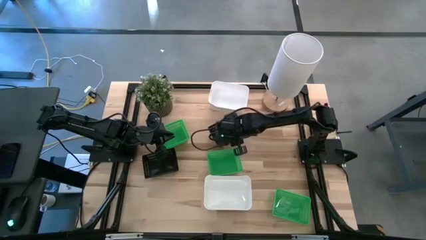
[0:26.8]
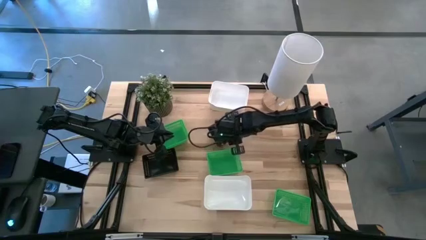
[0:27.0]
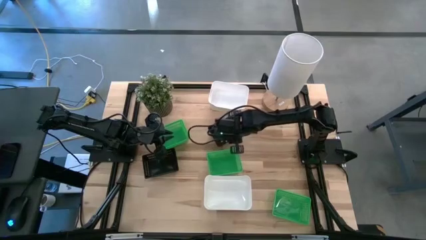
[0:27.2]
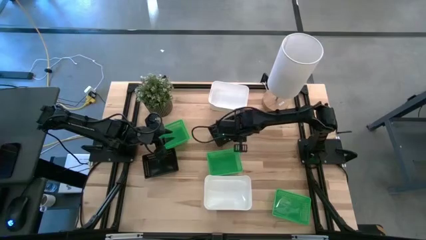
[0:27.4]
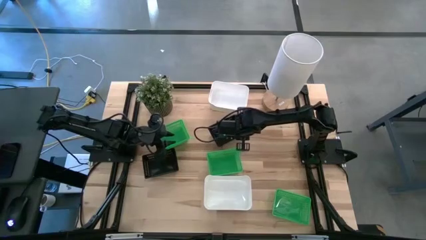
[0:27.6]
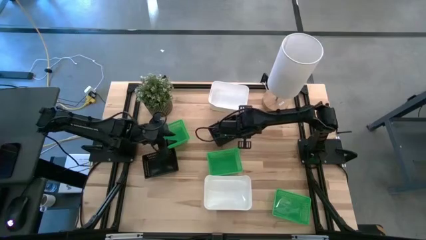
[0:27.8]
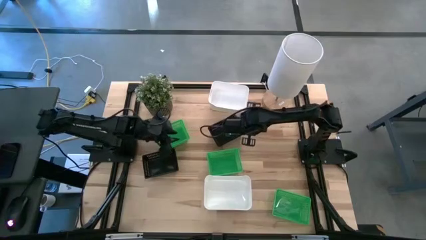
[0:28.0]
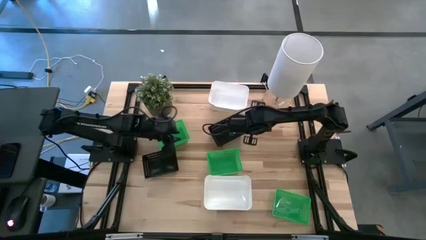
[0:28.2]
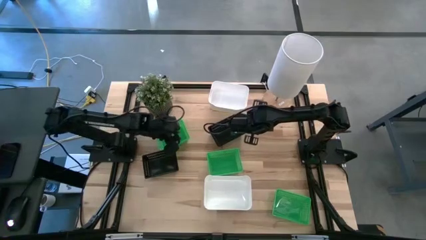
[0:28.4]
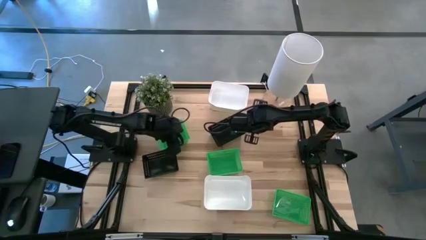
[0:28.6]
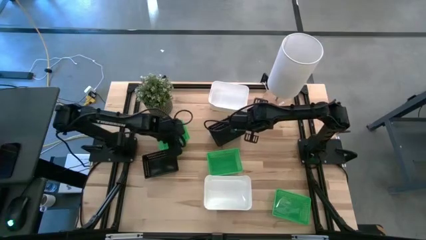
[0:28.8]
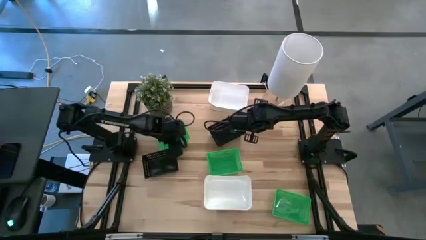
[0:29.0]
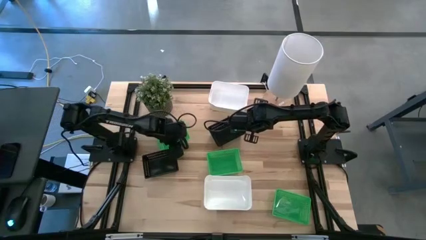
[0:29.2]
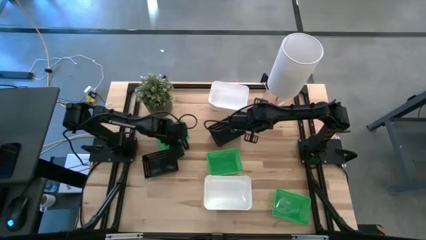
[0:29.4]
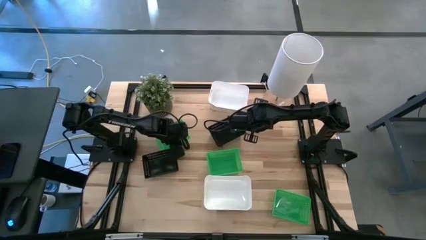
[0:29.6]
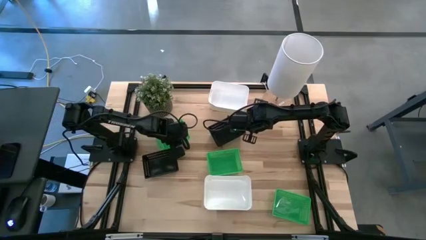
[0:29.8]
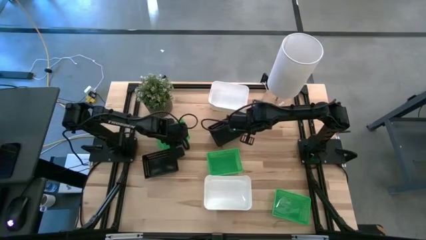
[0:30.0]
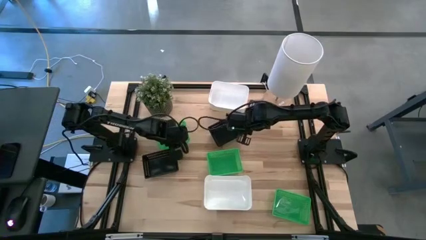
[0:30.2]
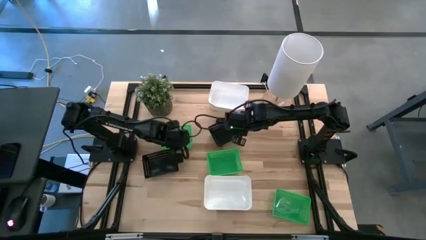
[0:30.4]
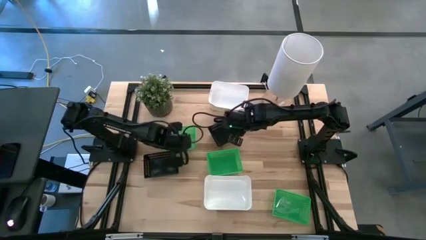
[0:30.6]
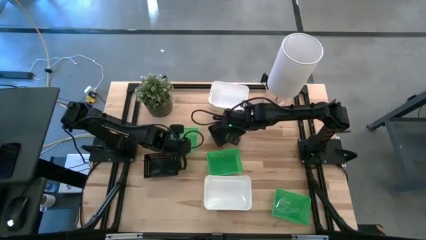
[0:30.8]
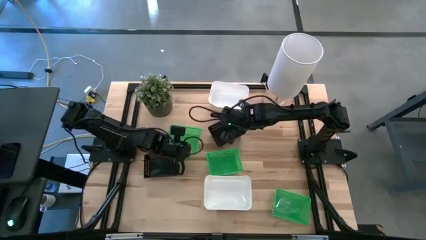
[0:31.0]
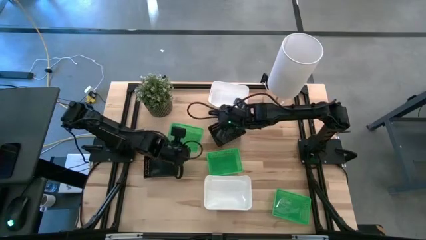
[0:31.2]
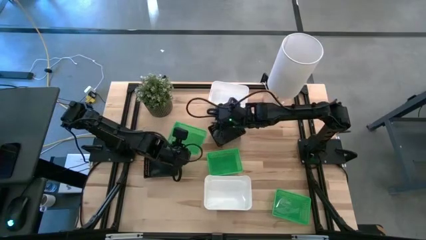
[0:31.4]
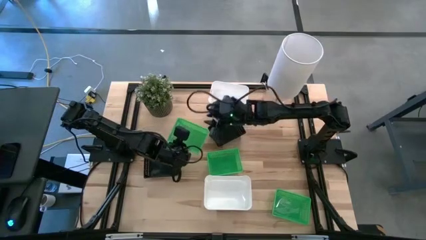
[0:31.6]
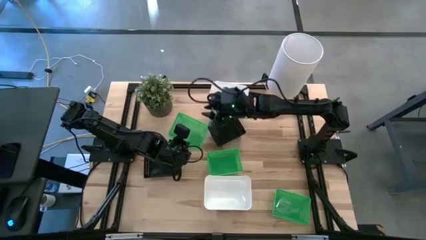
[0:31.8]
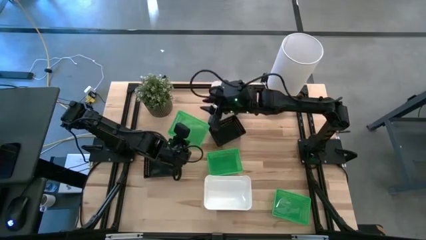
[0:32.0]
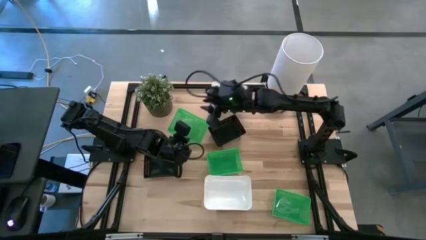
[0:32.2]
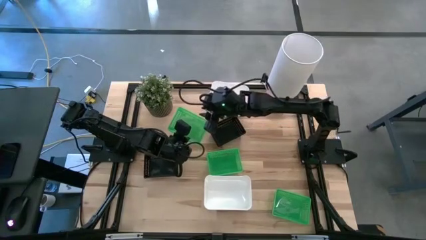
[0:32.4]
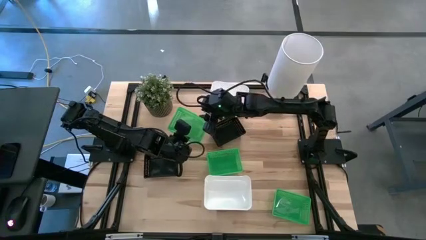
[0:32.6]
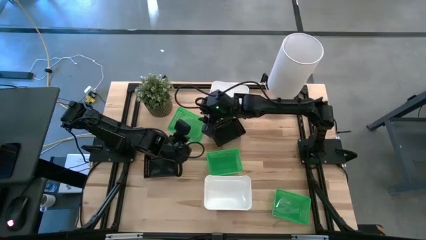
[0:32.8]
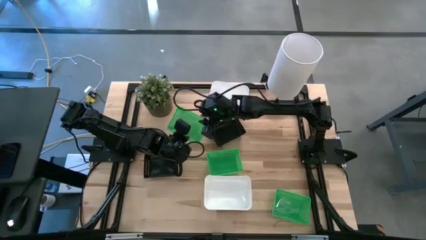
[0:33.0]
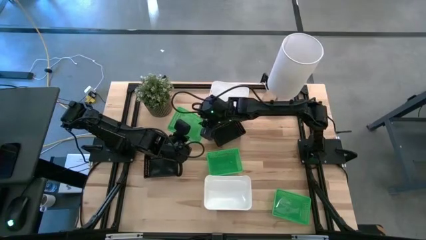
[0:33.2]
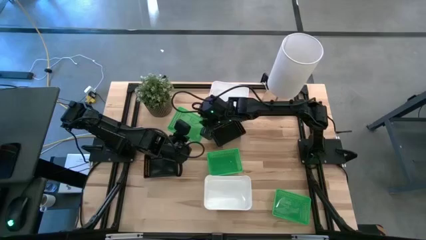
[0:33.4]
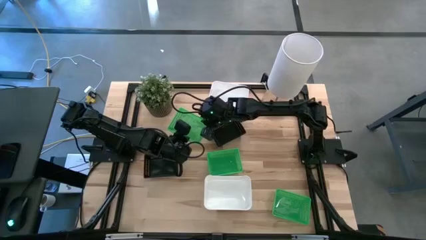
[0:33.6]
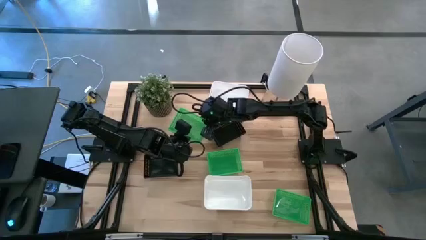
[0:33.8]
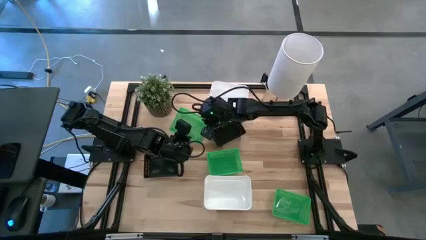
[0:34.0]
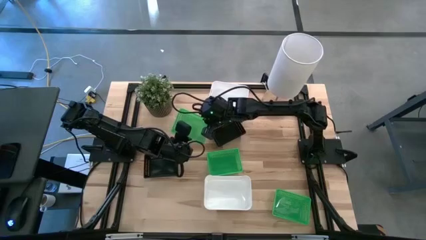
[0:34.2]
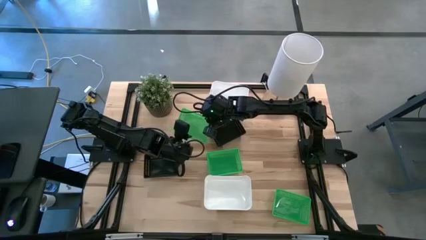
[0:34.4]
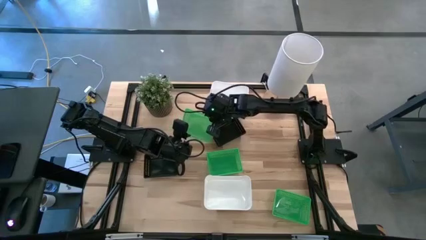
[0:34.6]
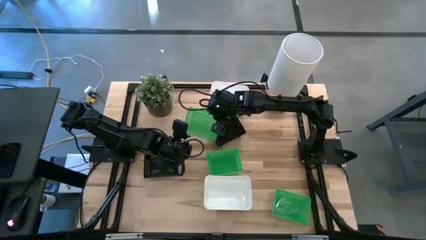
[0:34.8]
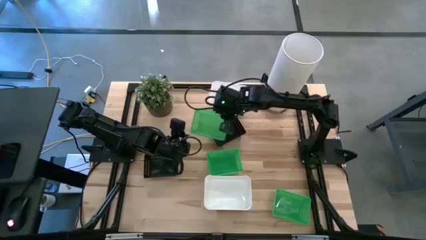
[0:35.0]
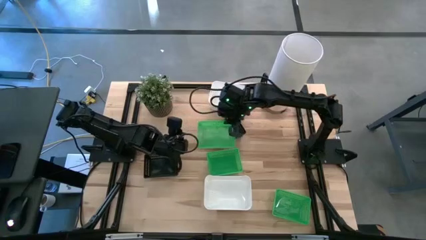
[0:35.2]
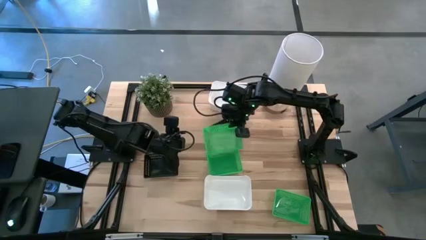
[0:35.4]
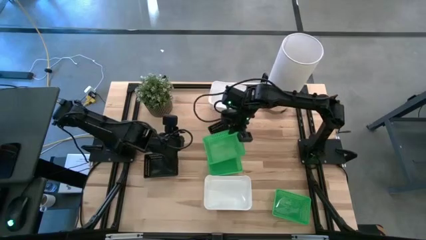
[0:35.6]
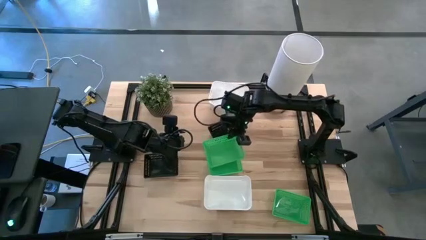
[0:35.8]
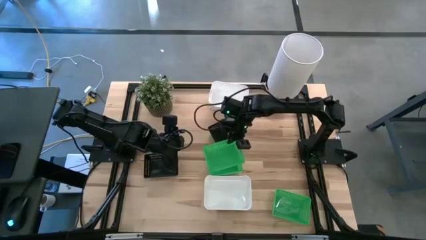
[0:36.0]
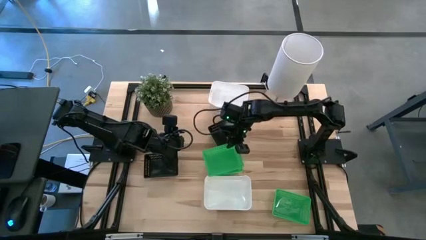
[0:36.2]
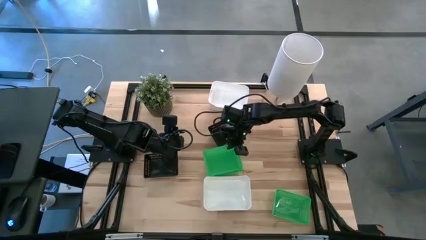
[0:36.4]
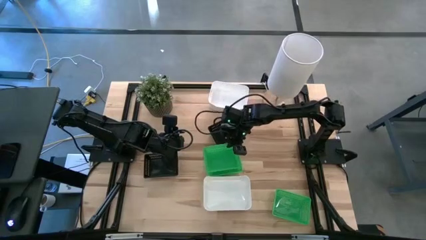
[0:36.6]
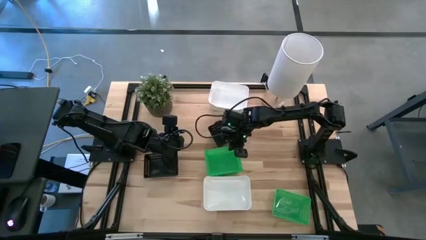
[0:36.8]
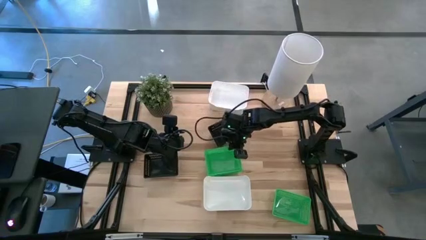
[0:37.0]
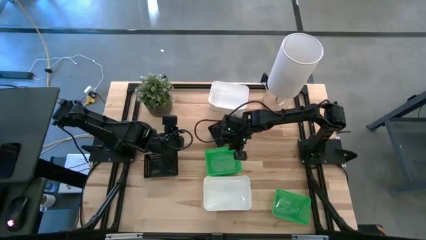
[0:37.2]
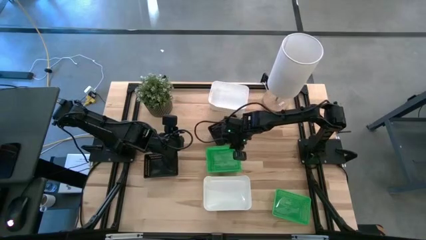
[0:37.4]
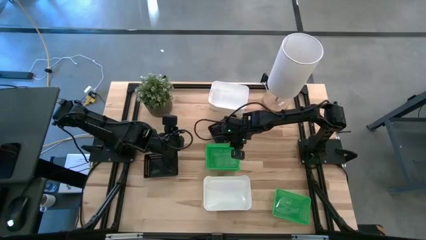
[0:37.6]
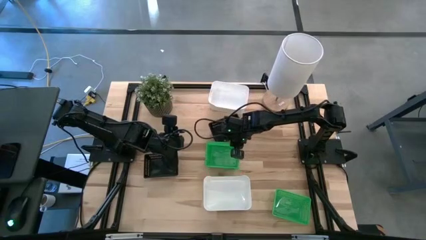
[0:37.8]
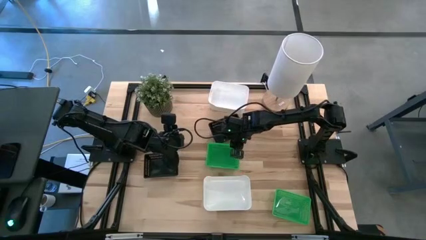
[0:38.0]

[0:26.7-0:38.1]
Stack the top green bin on the middle green bin

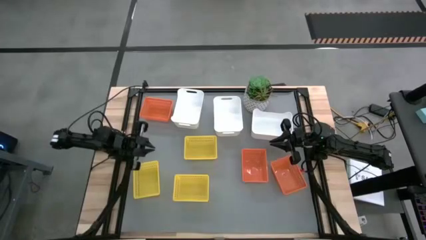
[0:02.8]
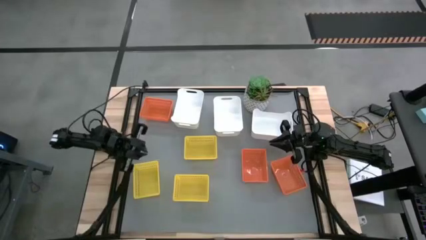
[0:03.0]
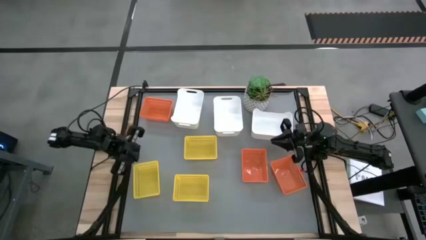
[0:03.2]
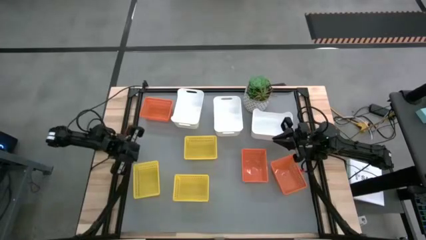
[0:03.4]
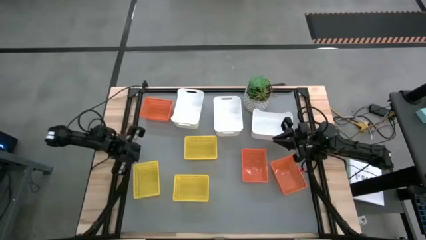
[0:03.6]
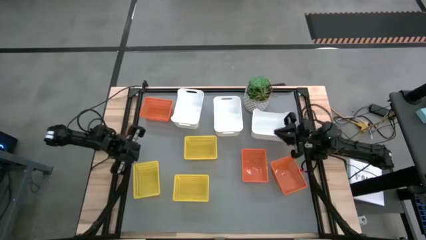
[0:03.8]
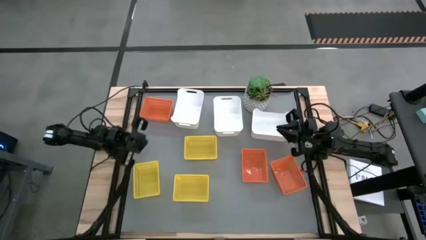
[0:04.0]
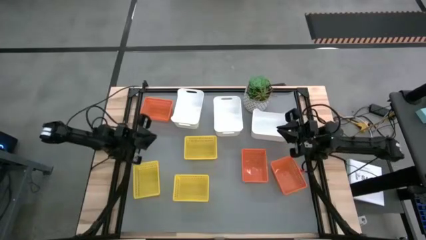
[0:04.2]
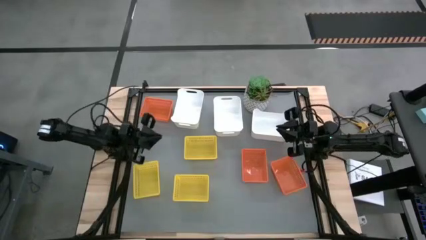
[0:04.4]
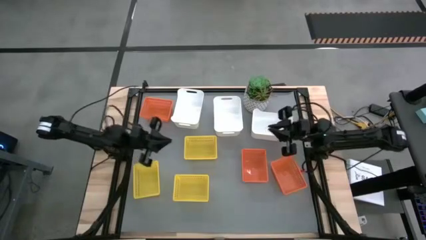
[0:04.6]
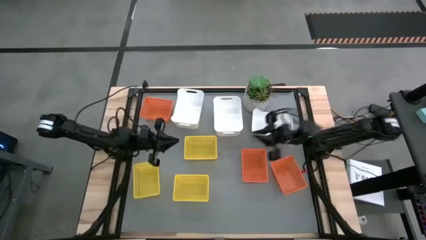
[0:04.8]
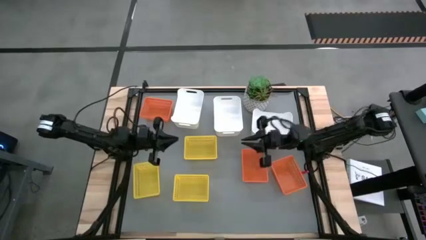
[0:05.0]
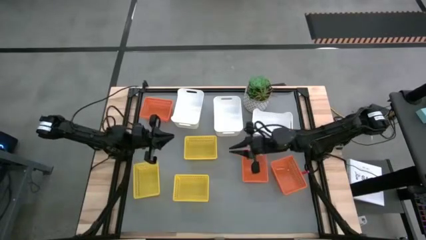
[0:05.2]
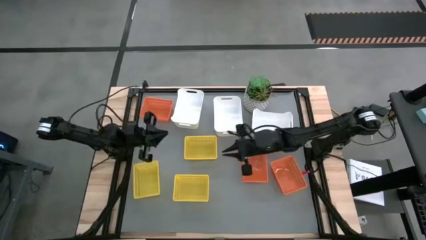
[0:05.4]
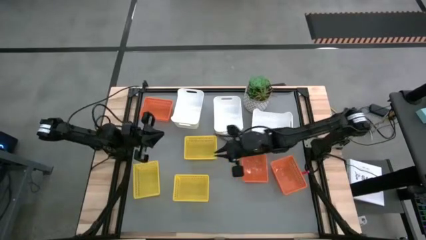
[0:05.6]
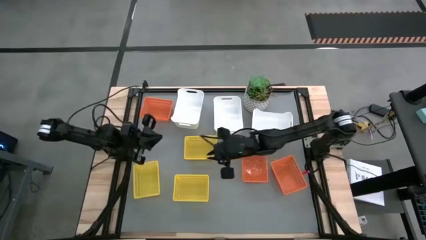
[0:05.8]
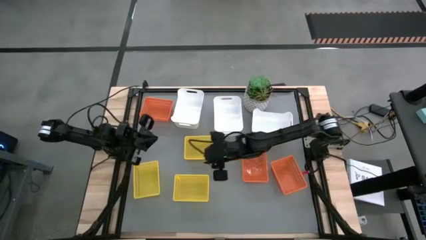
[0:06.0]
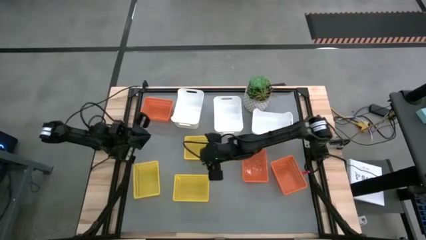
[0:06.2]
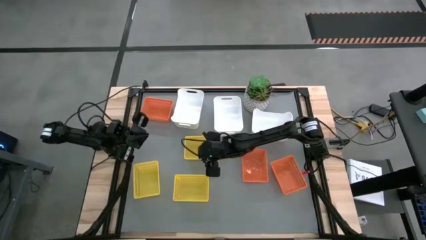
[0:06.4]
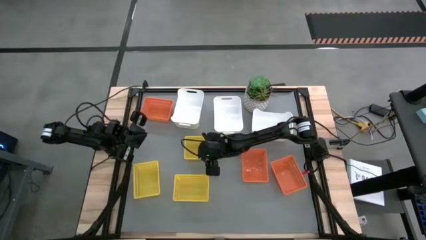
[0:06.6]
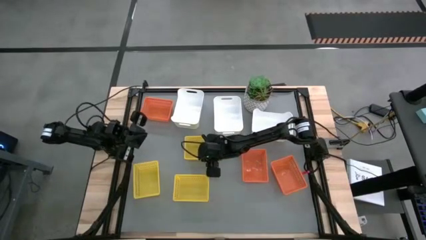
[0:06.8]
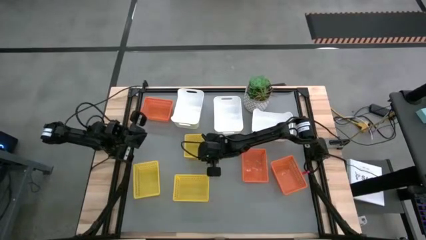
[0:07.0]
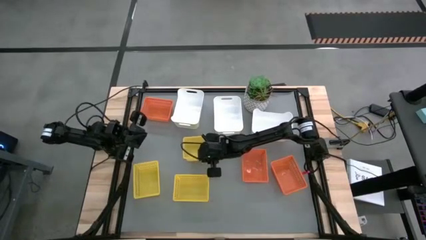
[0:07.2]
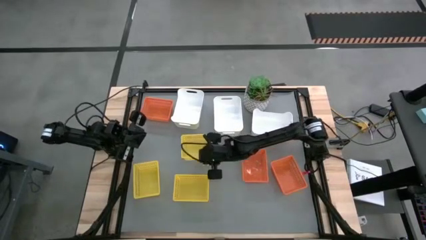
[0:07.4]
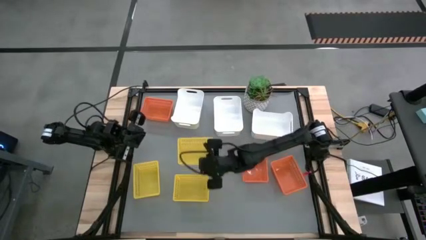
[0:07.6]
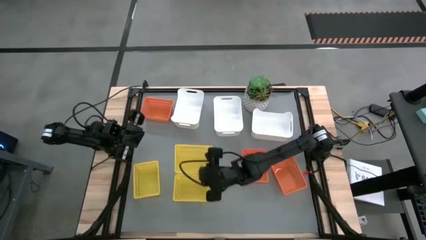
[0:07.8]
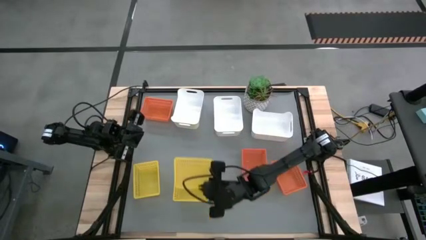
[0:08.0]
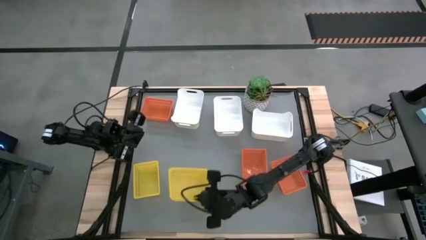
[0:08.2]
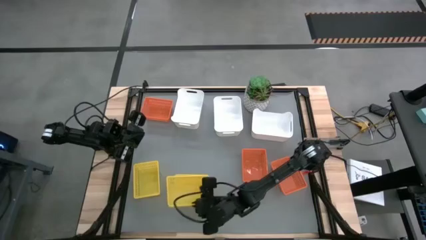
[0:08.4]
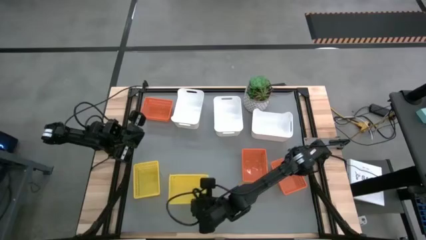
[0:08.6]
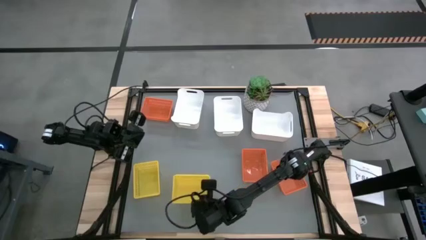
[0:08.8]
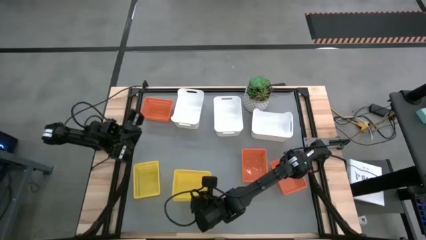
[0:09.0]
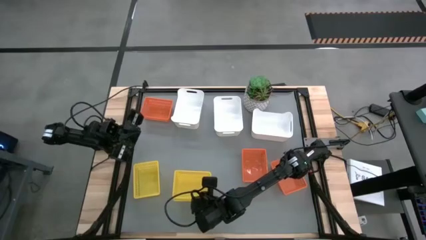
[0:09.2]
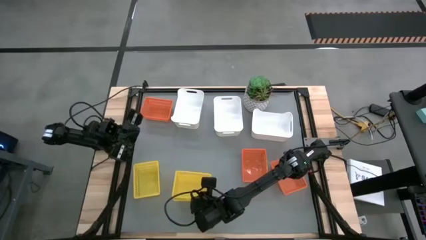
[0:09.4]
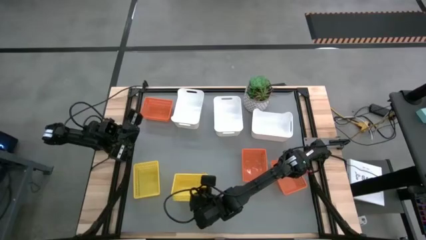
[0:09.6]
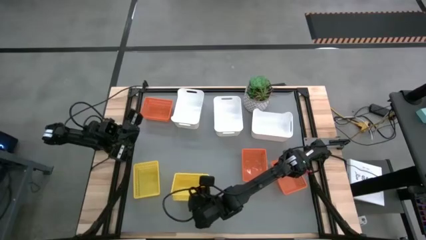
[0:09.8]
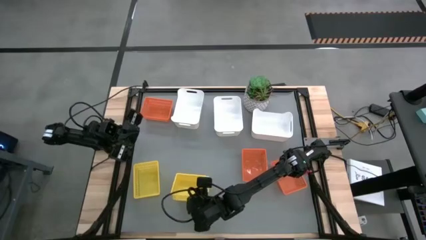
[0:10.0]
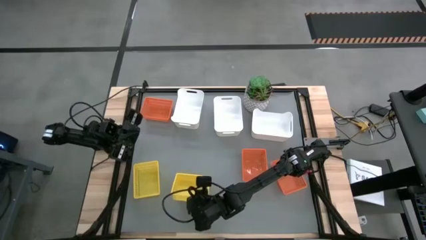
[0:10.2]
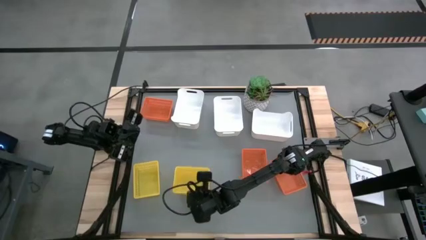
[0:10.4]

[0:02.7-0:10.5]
Stack the top yellow bin on the bottom right yellow bin
